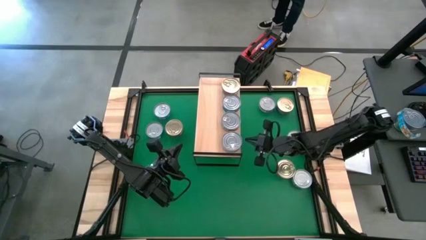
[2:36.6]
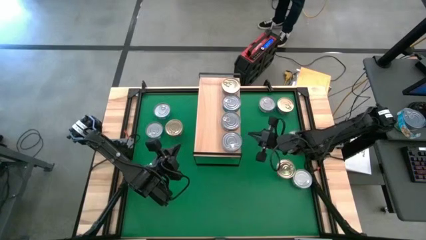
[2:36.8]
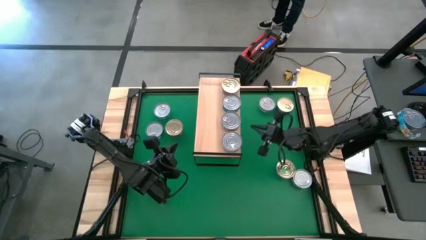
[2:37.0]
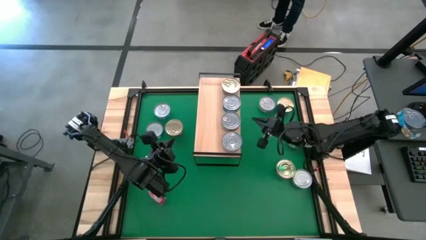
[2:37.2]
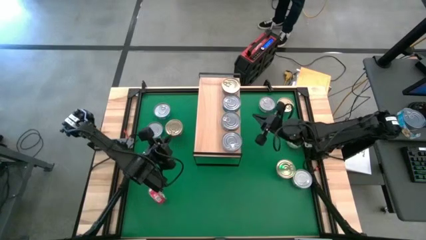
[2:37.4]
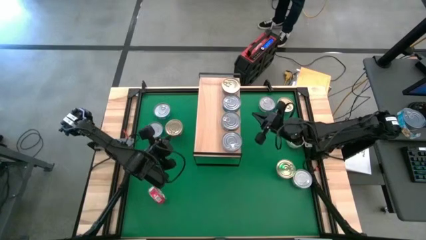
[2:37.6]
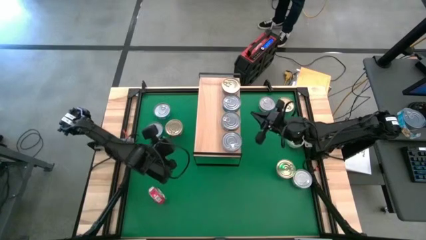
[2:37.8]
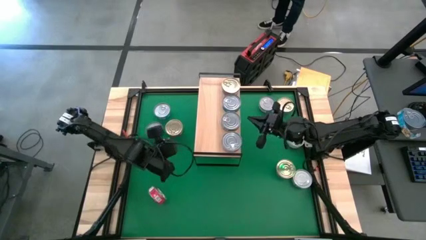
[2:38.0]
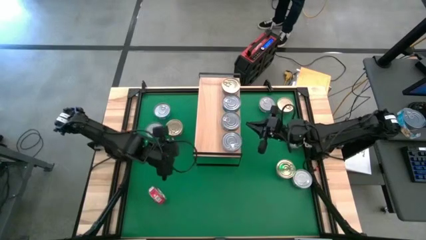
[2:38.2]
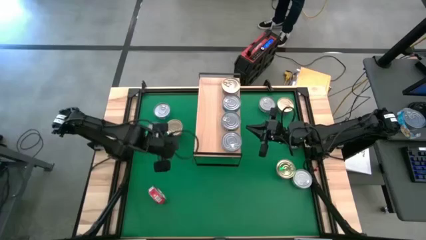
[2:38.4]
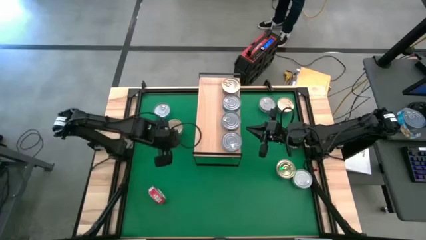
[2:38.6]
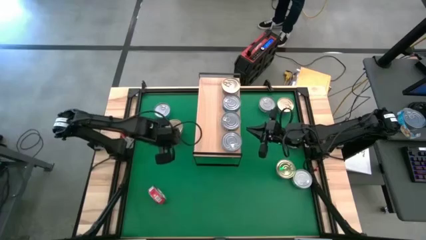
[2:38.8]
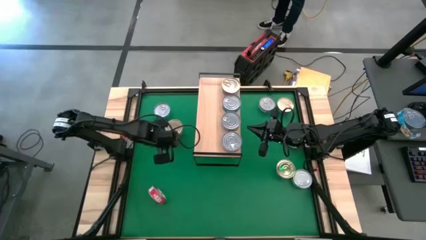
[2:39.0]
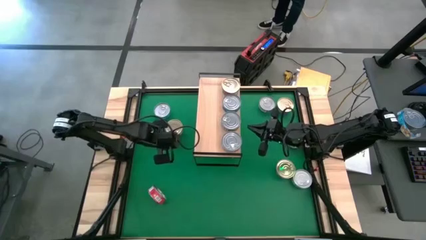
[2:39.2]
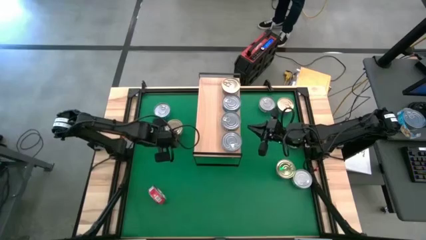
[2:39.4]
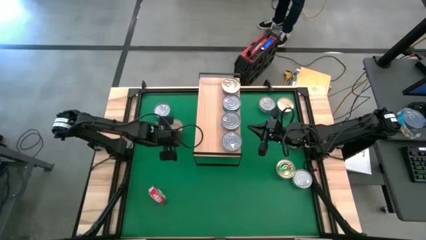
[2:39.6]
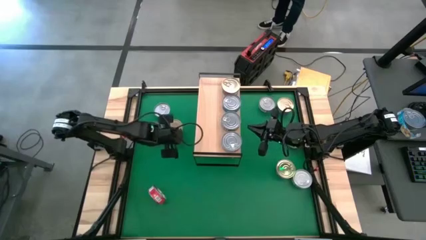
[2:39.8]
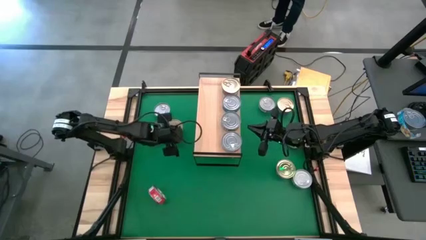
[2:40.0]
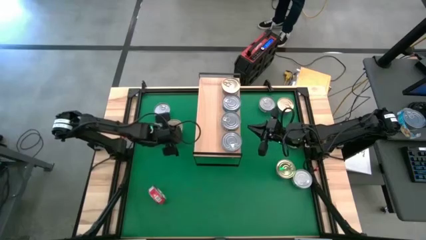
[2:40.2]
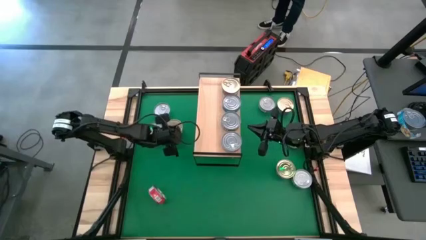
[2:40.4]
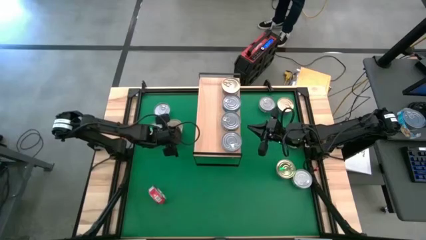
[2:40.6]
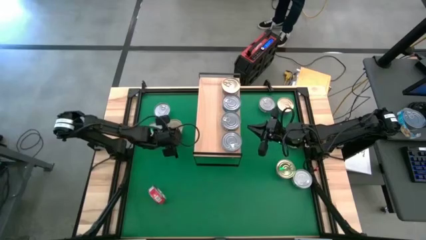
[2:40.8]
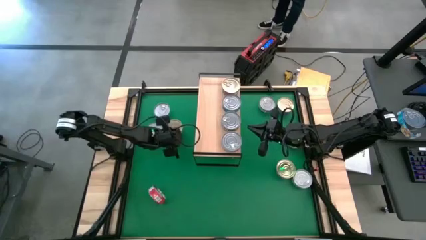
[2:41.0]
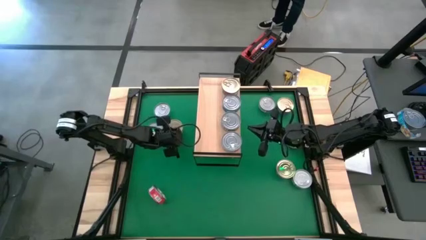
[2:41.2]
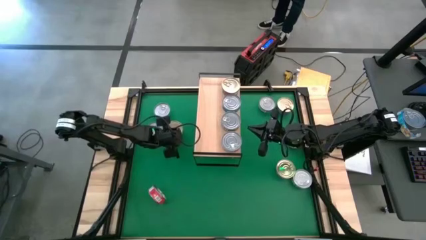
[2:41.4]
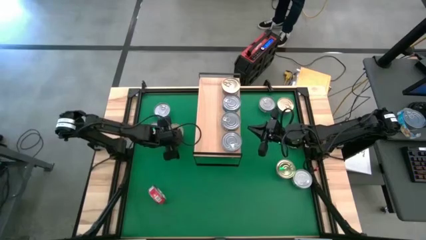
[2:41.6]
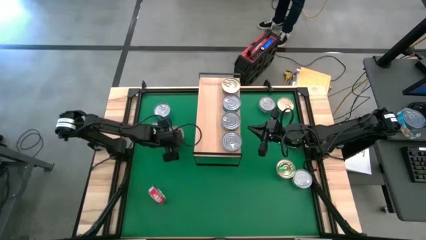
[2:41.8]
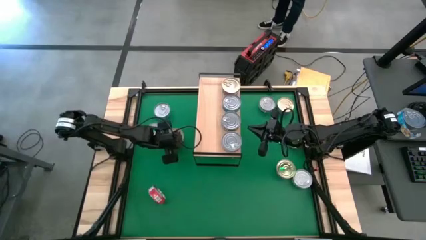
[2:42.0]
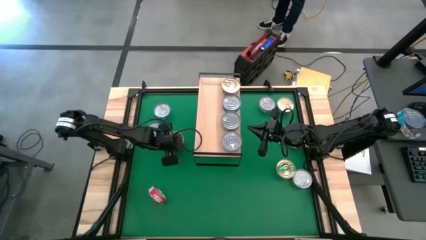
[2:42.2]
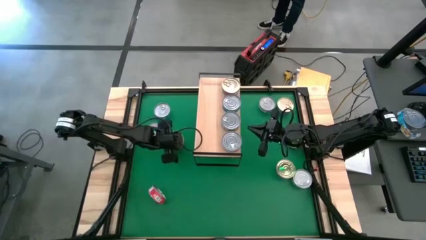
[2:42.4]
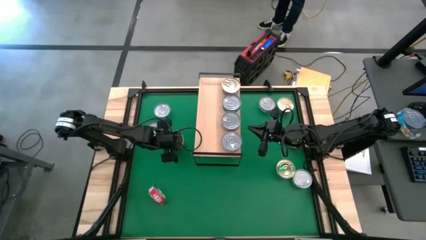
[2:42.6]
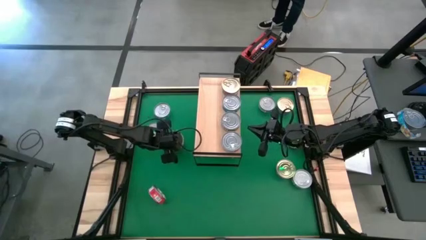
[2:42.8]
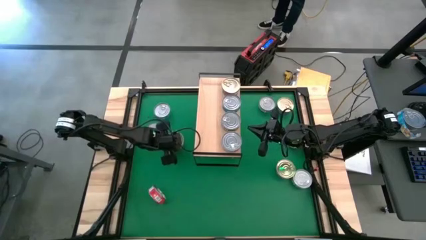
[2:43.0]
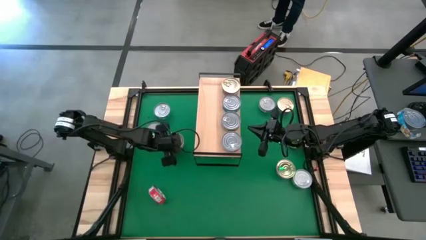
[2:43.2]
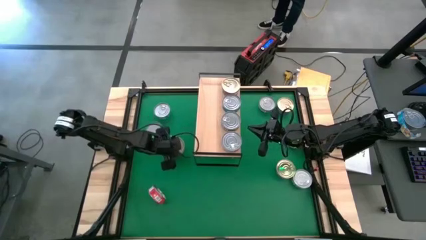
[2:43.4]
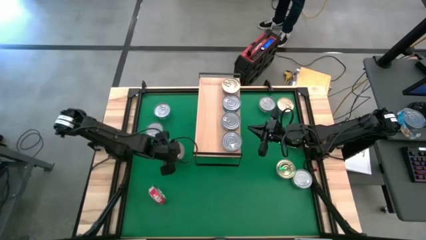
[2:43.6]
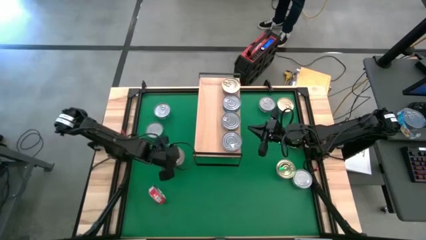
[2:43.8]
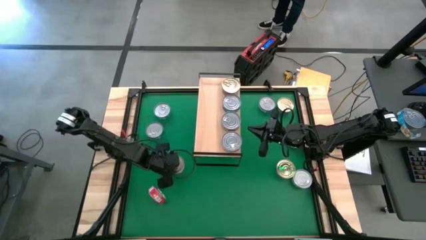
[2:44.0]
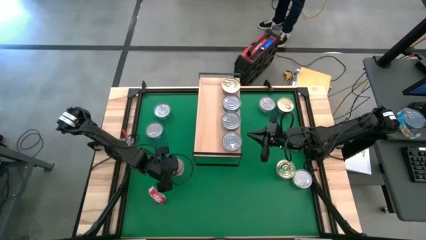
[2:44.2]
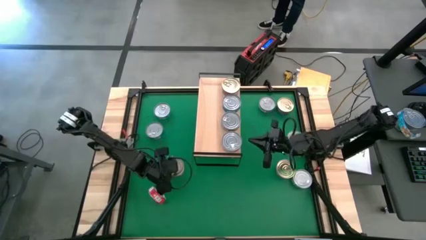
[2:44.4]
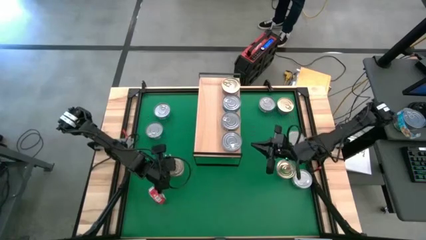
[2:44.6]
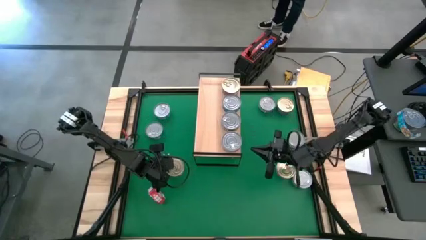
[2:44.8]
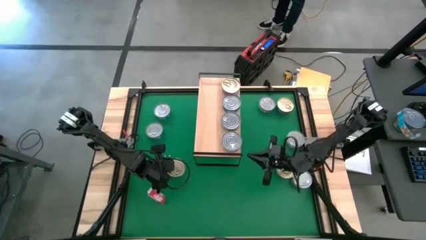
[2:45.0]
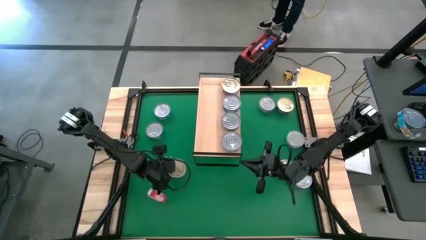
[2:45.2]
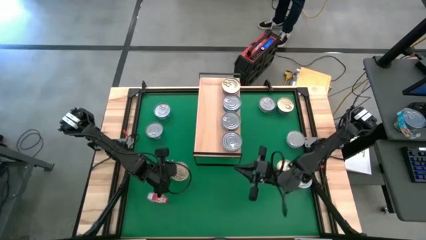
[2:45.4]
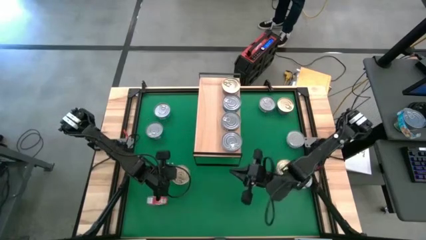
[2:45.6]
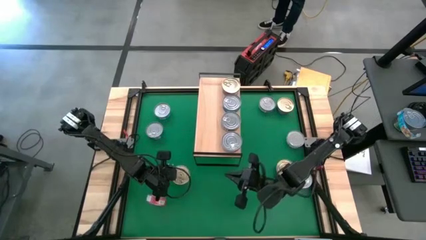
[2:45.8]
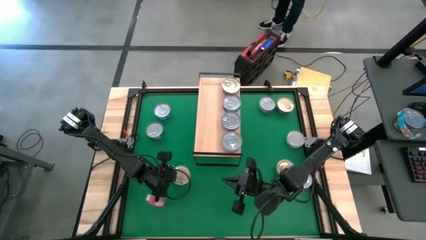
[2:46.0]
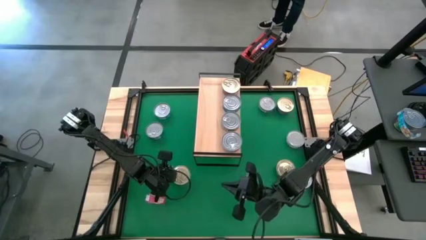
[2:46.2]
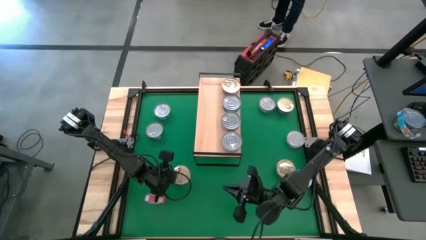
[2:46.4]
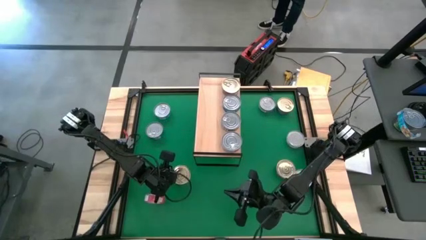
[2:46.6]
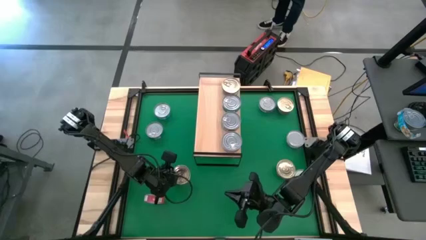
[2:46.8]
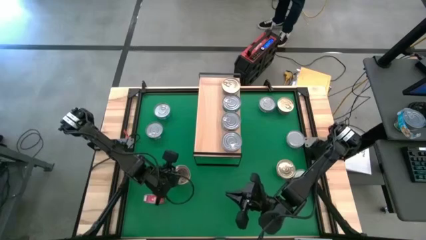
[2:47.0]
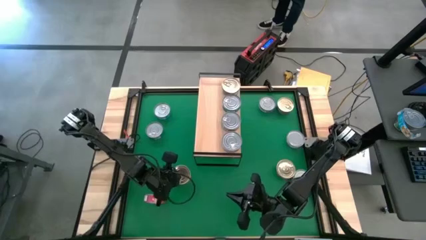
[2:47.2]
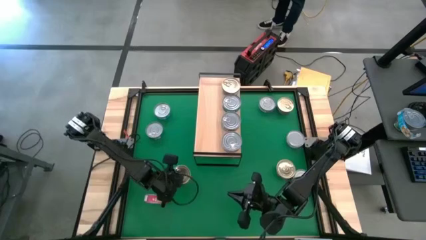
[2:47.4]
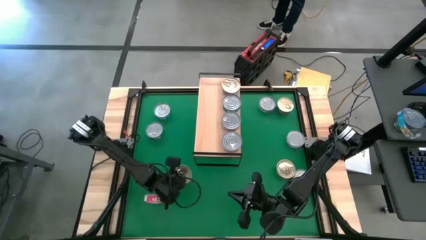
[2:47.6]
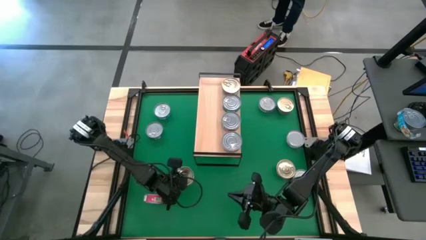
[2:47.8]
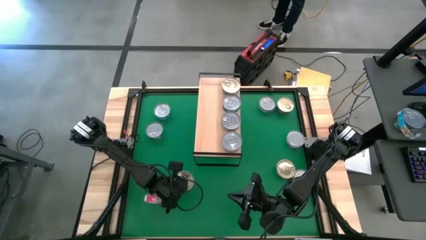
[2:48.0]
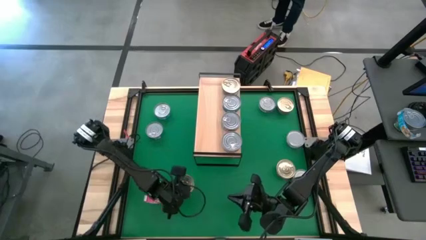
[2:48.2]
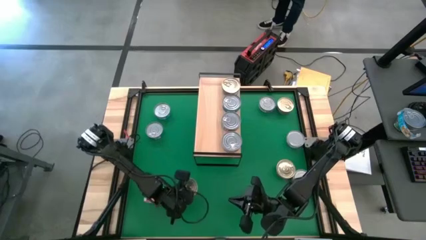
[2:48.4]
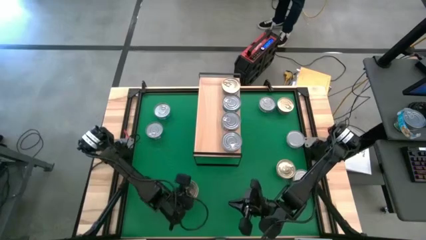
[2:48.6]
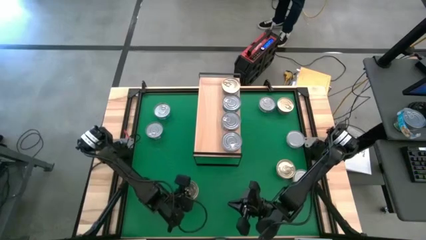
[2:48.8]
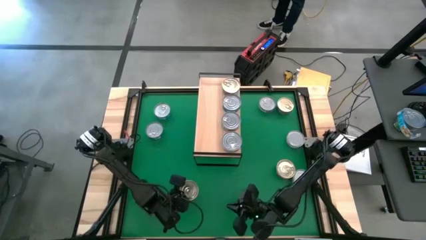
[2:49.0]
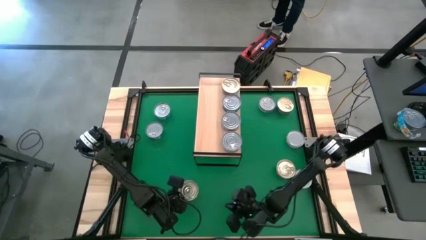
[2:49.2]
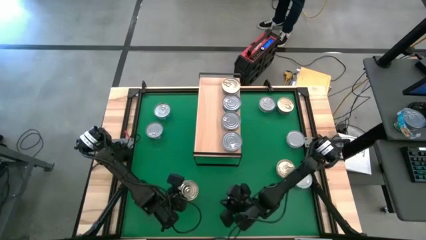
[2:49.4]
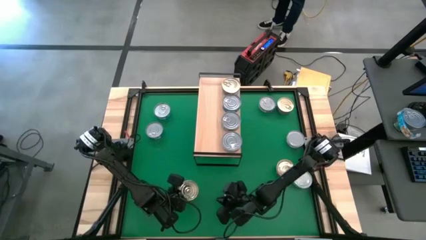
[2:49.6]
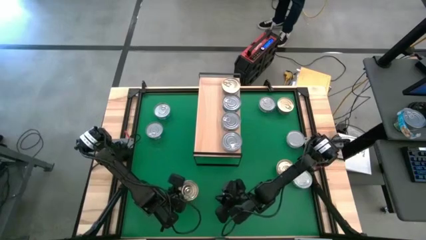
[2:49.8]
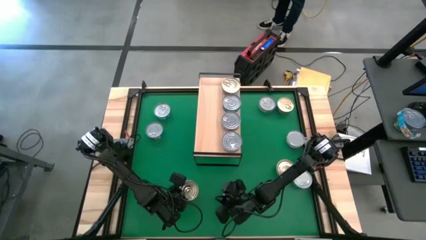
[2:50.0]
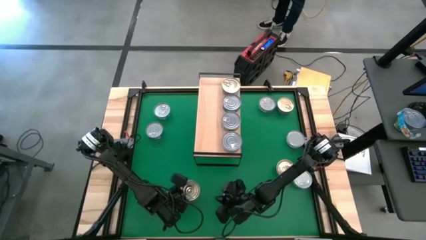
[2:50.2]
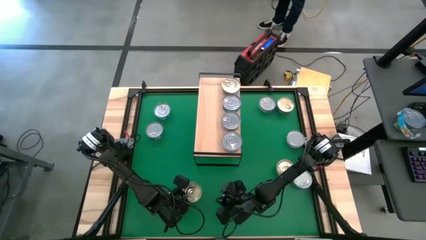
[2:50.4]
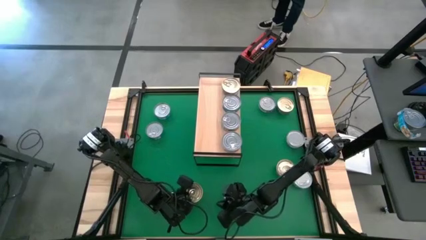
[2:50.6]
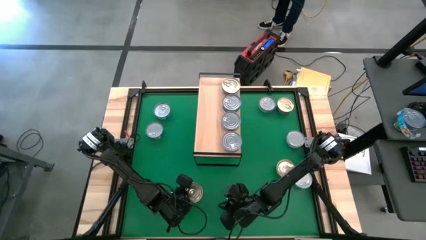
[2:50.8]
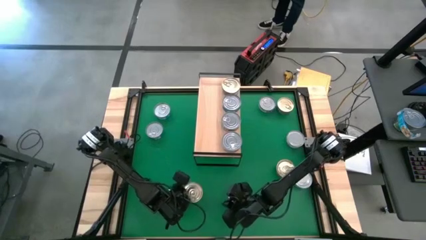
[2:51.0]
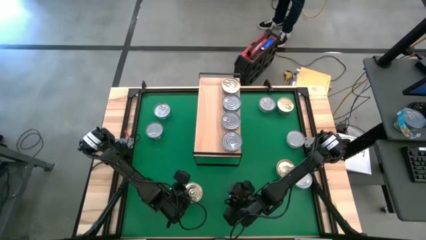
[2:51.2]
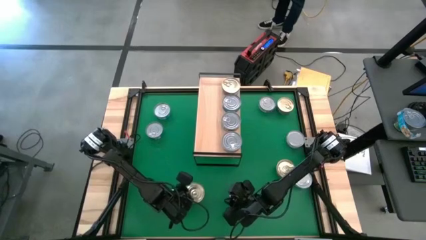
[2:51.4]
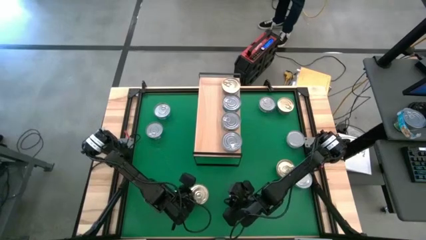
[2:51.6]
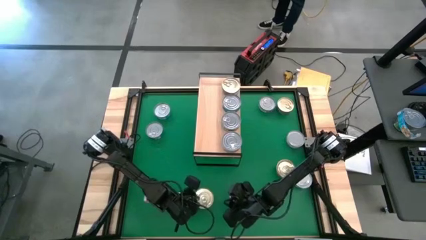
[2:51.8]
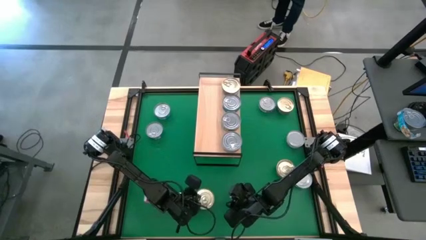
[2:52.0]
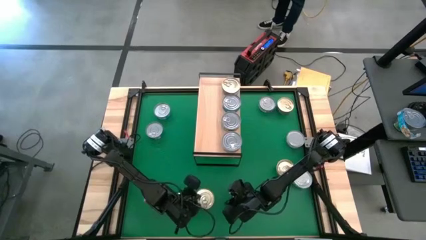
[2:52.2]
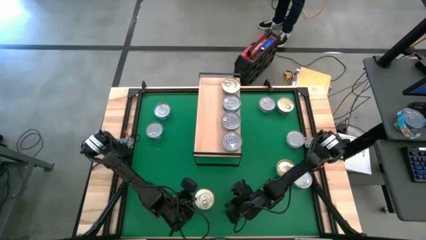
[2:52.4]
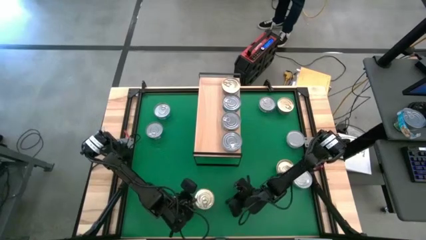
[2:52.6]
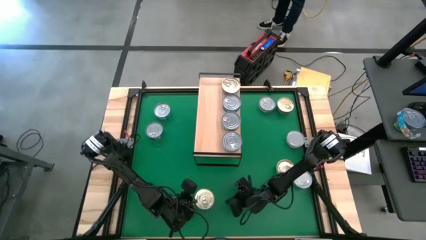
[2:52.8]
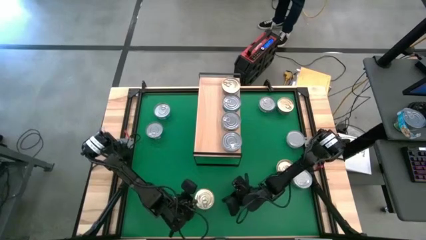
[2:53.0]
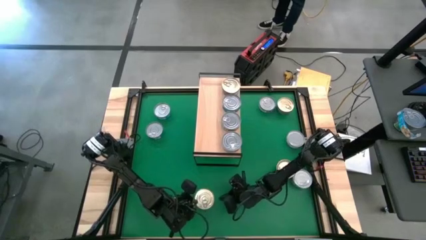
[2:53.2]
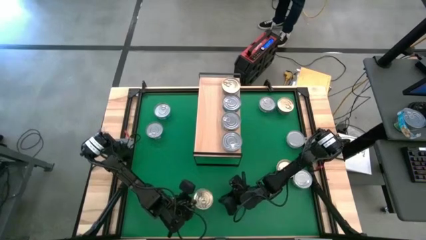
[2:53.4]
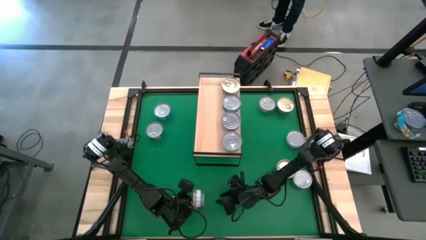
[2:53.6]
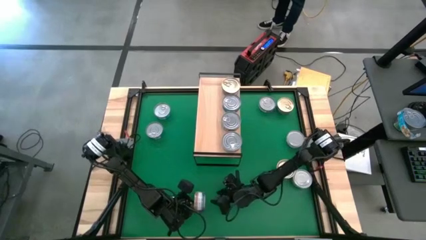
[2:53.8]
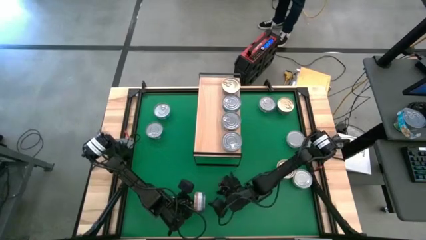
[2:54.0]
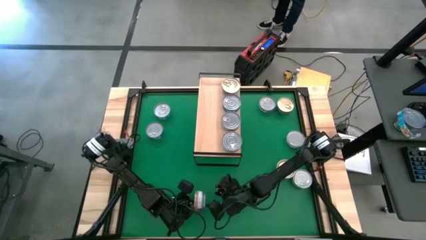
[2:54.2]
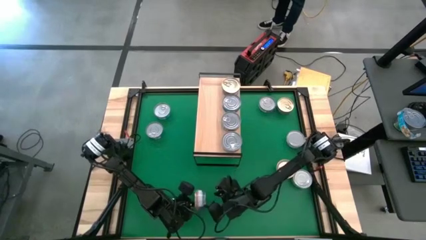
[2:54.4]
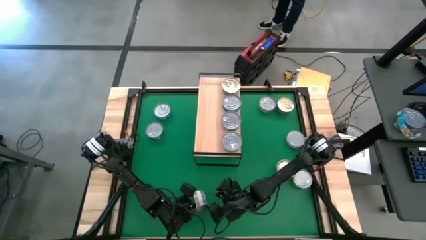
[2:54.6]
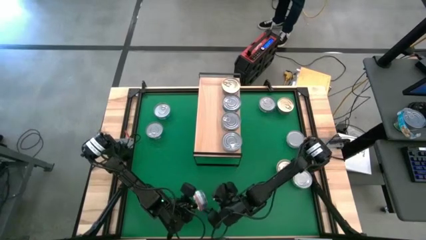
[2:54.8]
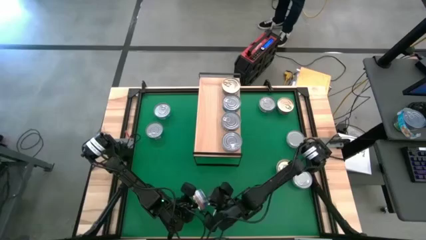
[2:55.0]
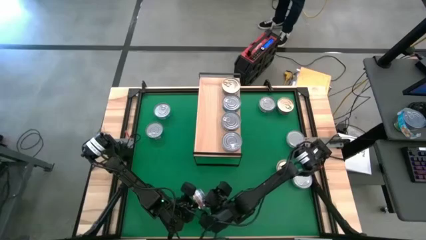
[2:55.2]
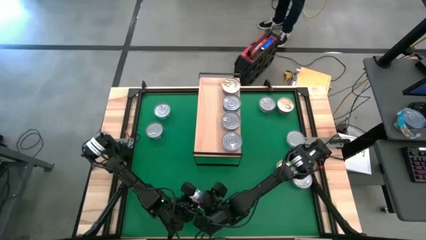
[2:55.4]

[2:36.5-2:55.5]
Task: Stack canned seafood by type on shelf
Stack the top left dark blue tuna can on top of the dark blue tuna can on the shelf
